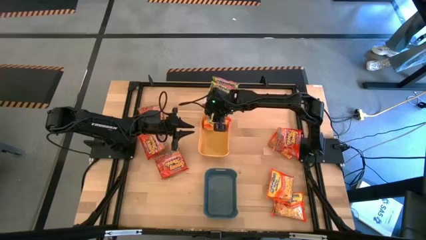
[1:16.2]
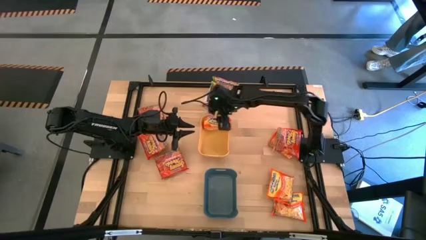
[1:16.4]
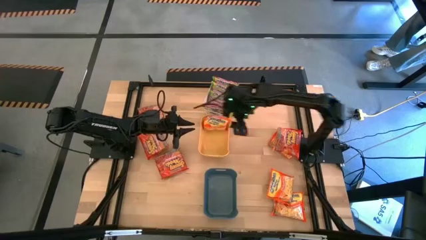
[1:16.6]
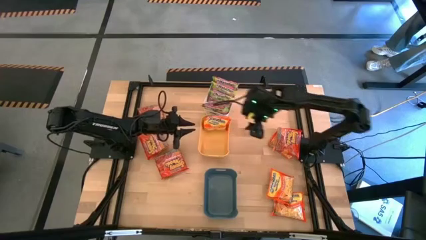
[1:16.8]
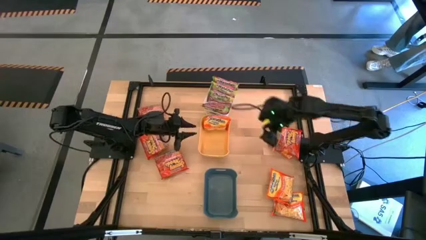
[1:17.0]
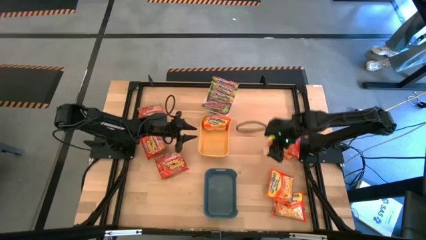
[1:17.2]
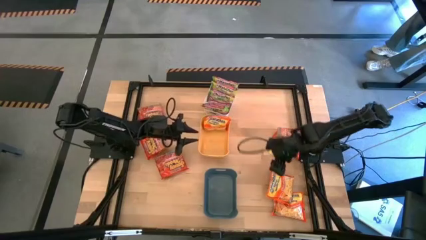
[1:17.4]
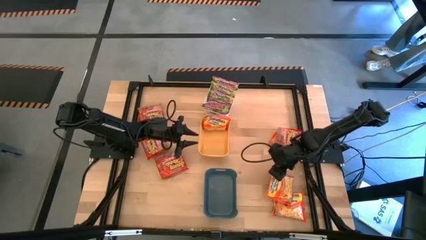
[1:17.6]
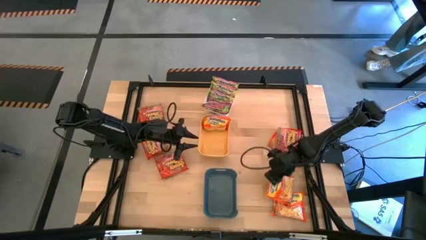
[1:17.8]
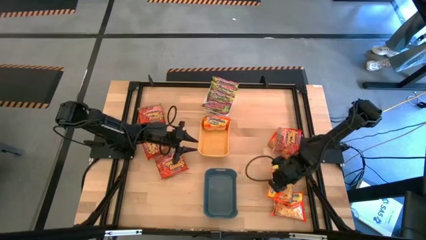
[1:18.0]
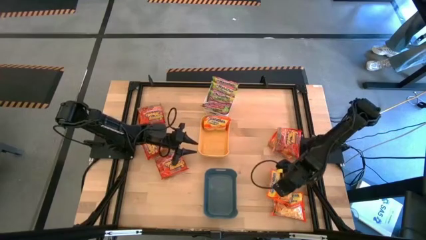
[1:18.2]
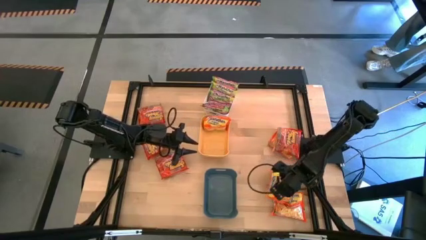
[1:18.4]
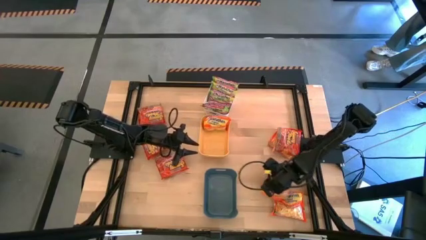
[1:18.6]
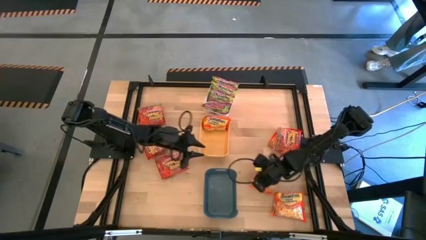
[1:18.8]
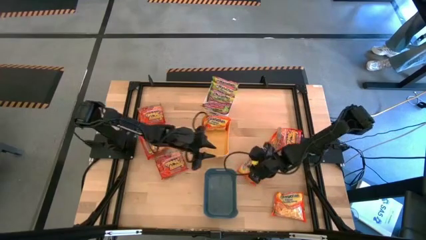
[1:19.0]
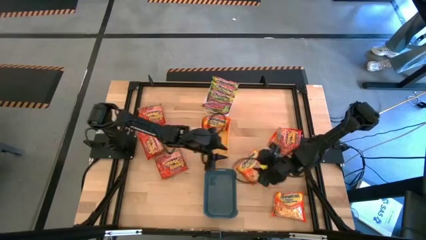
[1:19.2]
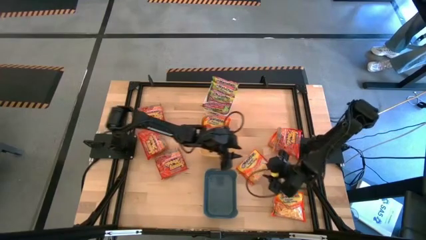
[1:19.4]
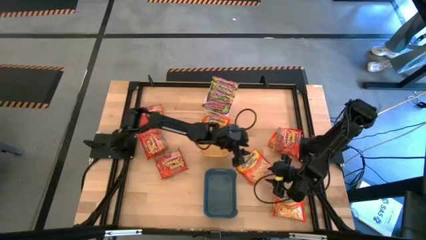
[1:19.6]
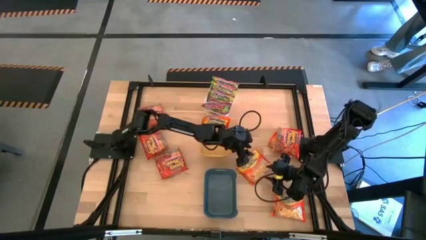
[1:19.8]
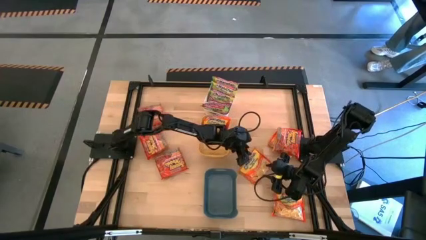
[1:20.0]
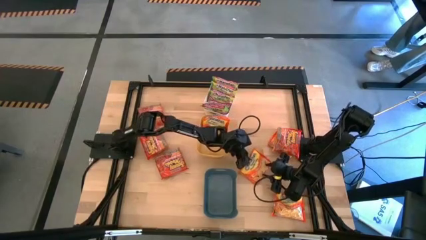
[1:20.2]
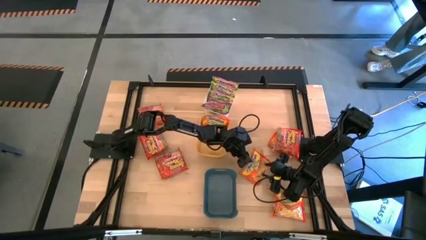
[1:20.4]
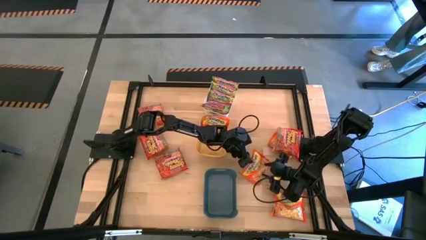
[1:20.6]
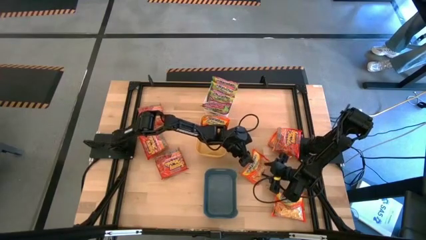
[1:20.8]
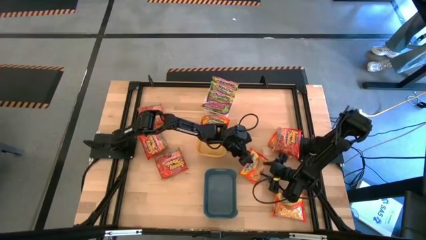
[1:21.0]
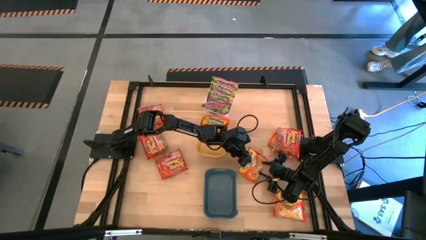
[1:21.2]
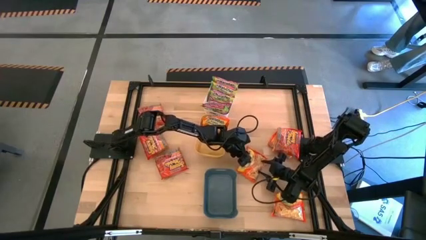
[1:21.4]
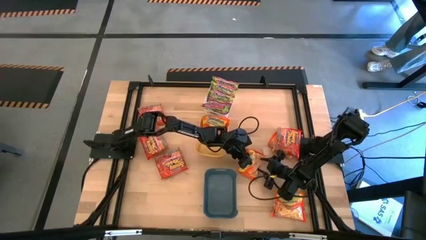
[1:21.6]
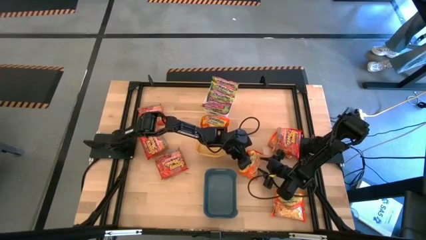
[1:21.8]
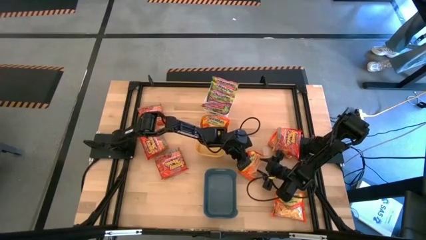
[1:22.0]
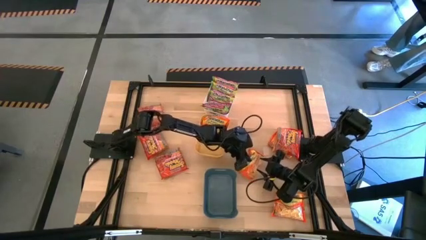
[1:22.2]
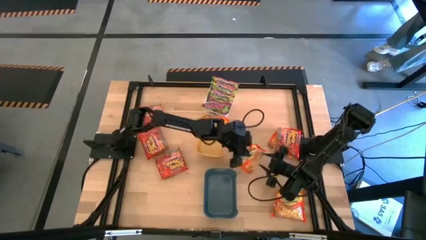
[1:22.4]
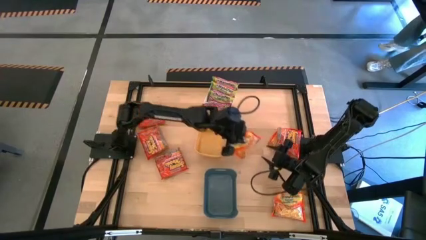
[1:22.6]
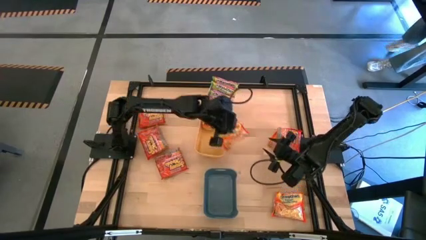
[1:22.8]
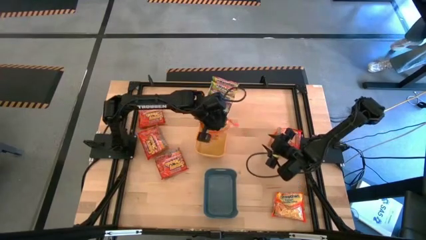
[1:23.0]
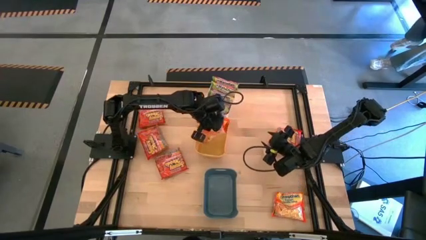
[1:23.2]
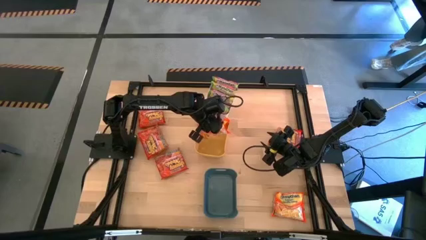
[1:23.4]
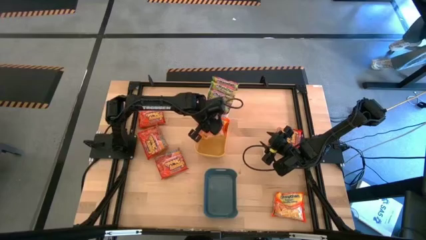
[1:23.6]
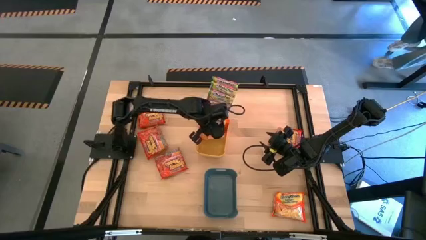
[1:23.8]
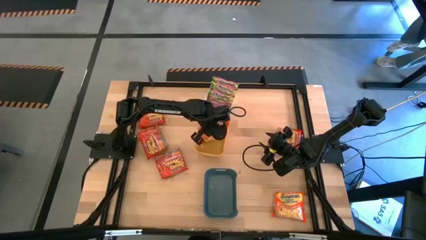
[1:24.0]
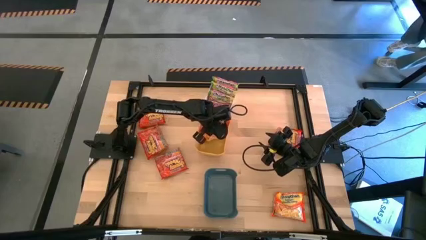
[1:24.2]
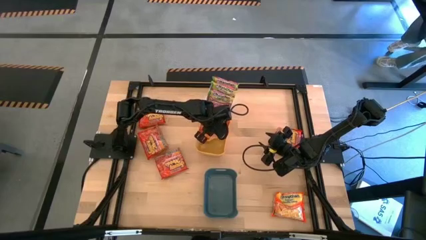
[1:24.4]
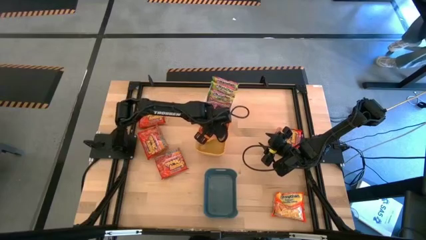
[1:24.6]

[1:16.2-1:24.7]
Task: Sort Maruchan noodles
Put the yellow noodle pack into the yellow bin

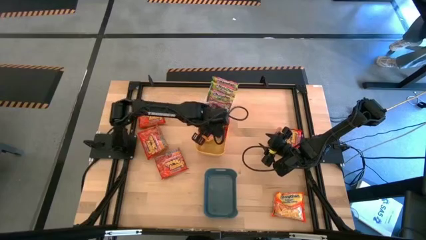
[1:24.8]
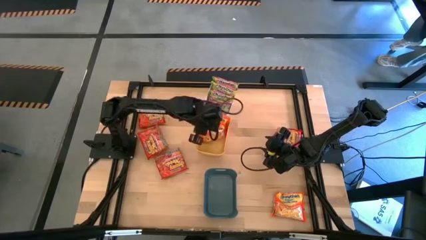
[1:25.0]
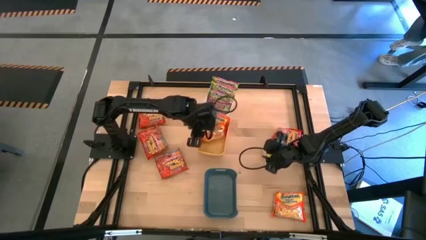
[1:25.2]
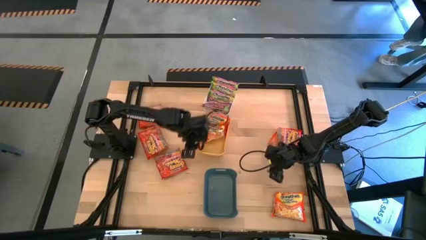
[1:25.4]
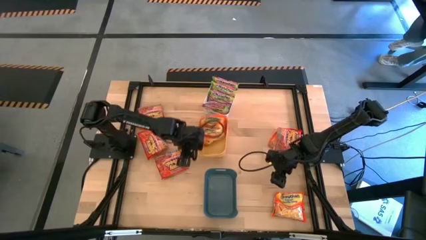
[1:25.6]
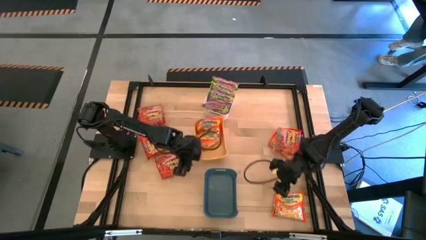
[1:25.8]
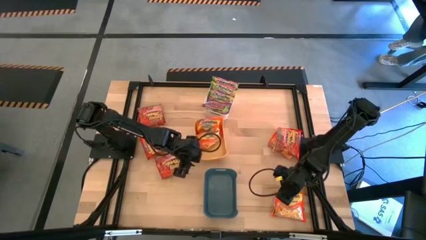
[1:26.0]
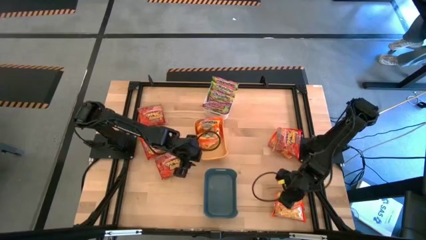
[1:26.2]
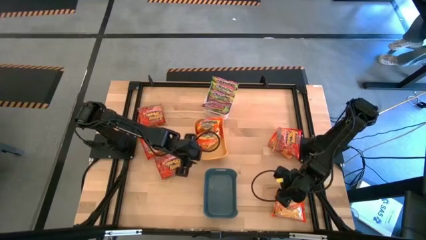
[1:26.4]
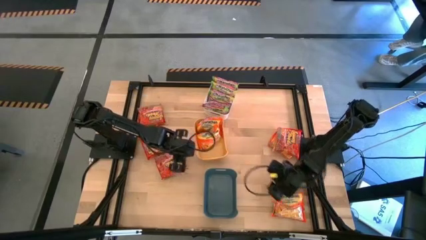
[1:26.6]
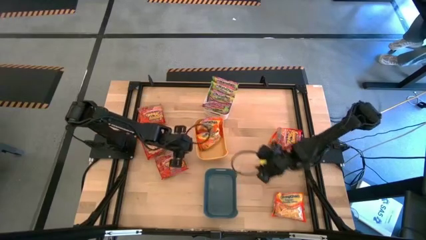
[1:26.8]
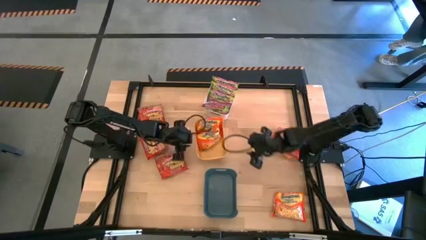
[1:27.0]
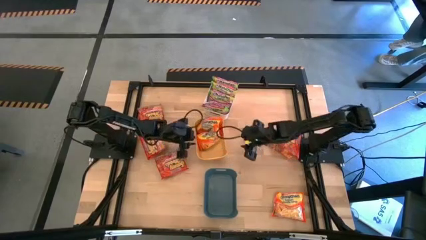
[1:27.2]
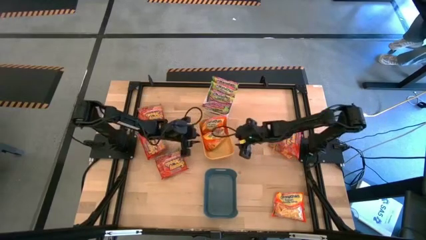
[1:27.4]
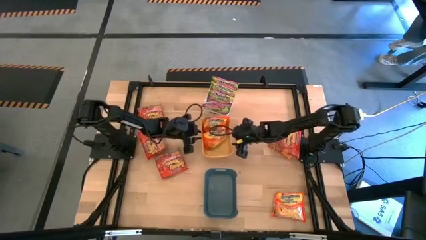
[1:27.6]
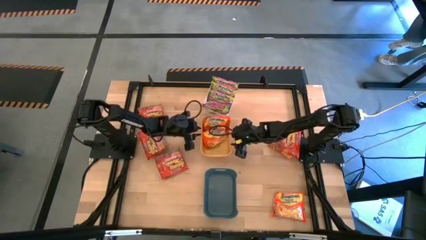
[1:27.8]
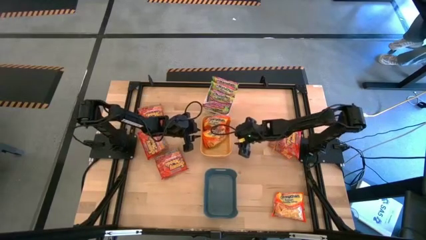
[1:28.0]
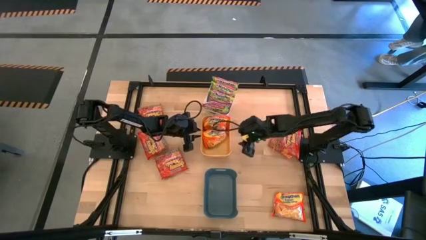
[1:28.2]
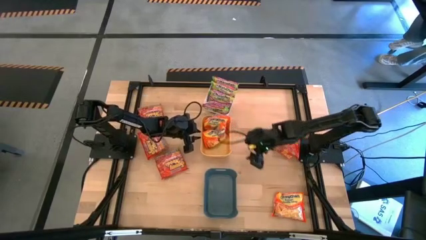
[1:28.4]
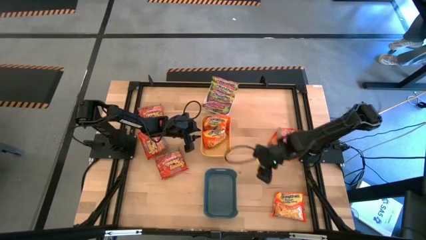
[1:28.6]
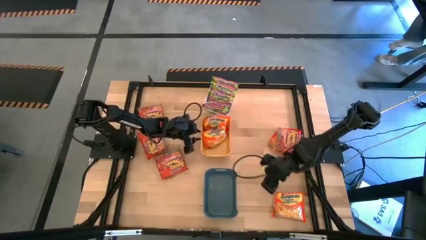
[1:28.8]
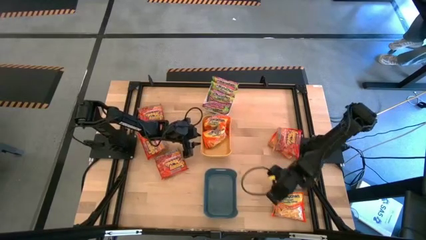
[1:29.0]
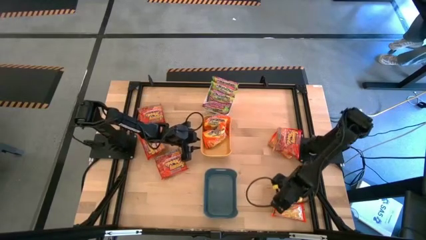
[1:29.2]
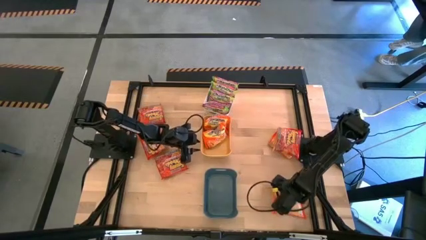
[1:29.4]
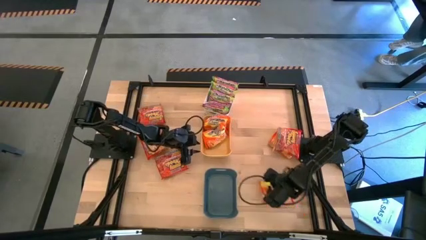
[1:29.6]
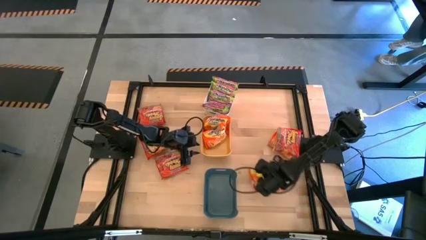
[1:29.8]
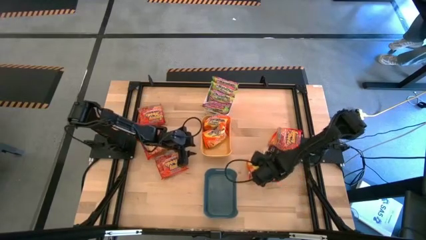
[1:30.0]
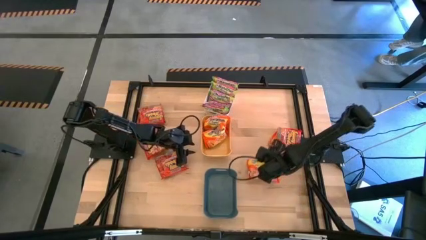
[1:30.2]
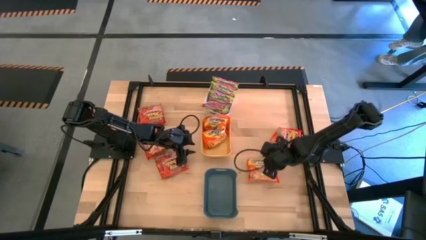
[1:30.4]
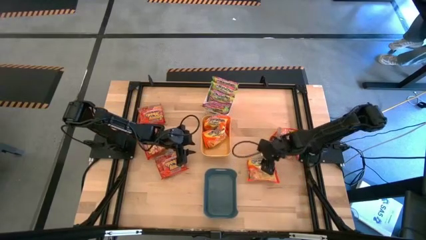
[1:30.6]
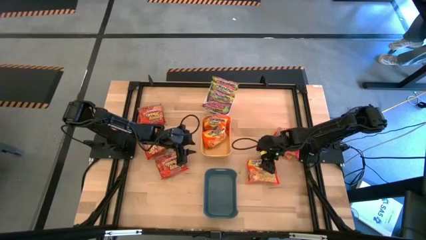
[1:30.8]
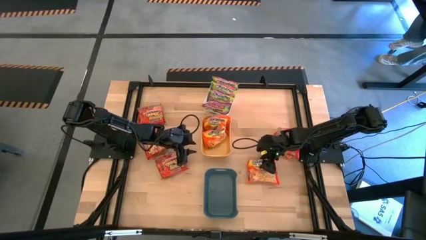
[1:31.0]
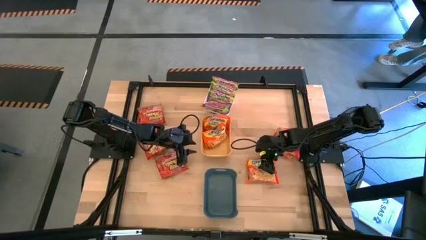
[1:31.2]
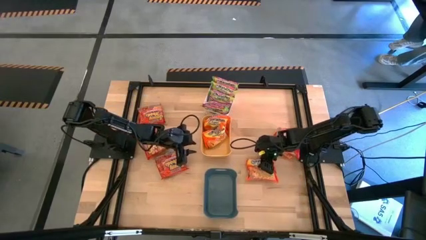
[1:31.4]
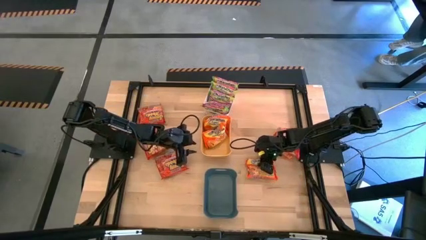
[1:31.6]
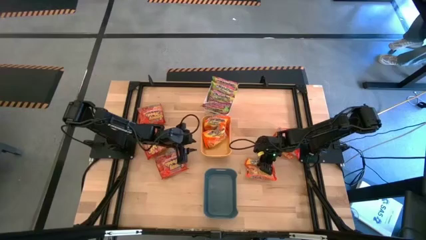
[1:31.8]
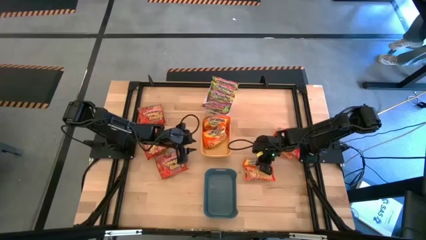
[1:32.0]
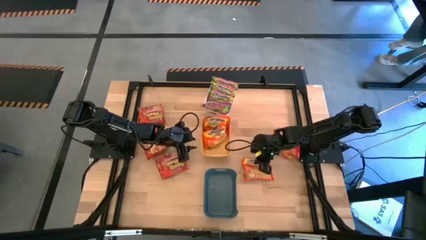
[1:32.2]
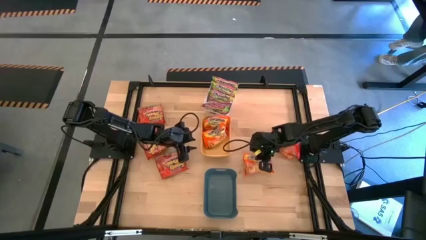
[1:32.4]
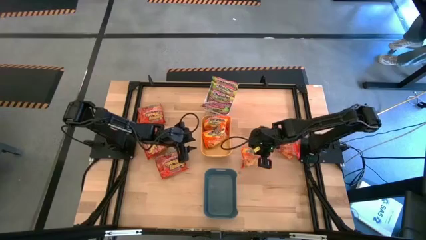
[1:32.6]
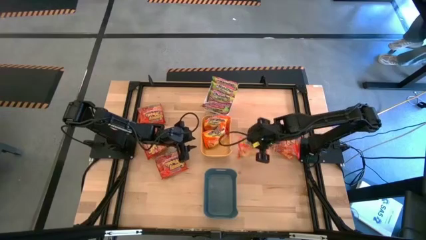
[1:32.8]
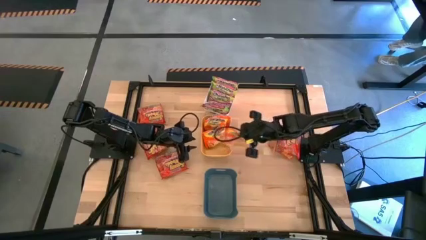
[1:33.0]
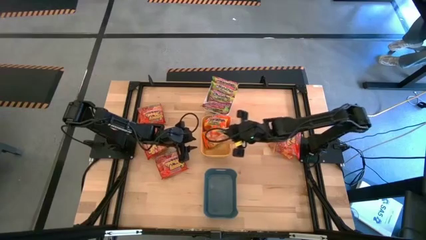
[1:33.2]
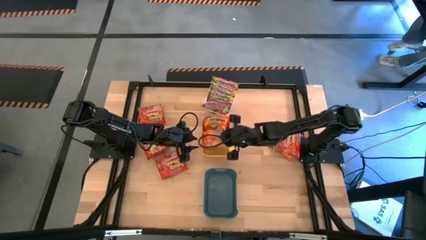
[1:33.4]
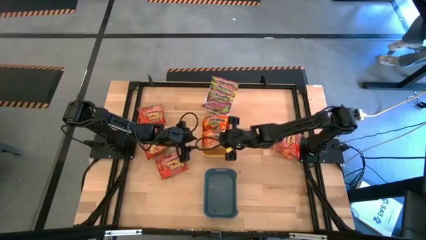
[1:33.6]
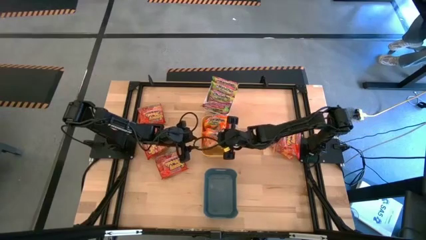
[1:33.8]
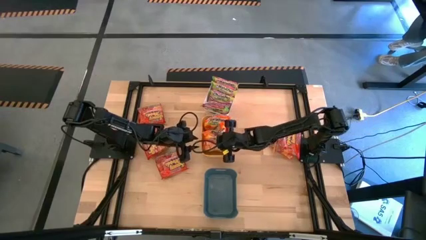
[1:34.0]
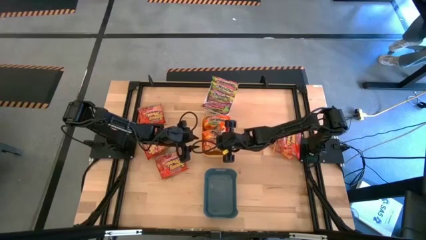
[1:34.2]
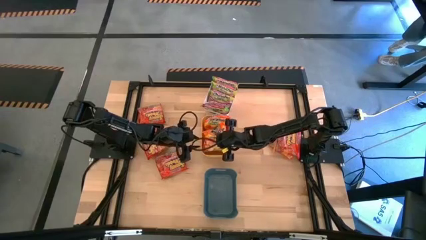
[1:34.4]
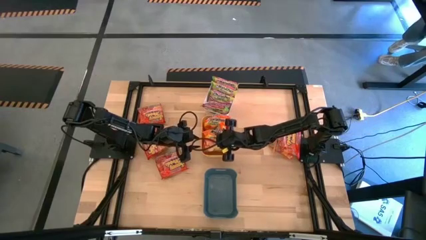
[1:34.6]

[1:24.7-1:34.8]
Put the yellow noodle pack into the yellow bin
